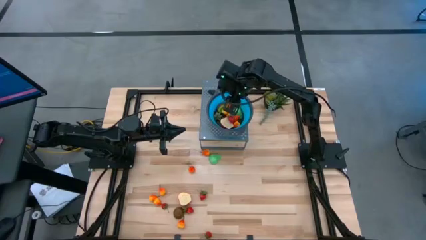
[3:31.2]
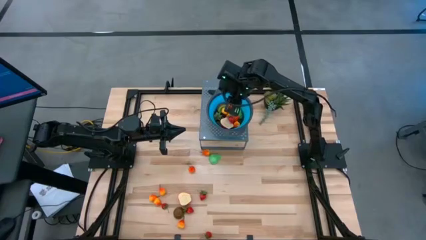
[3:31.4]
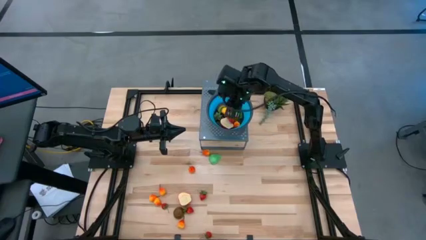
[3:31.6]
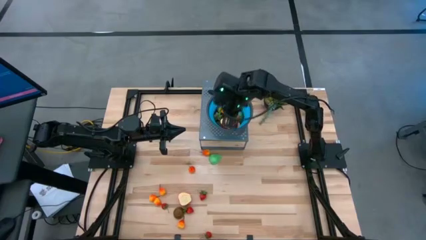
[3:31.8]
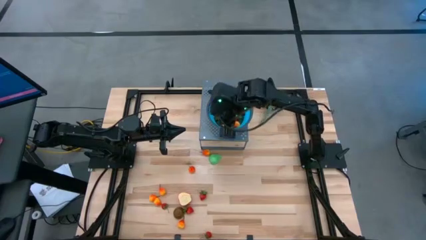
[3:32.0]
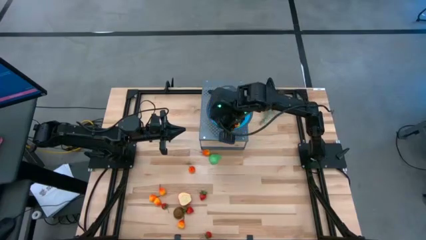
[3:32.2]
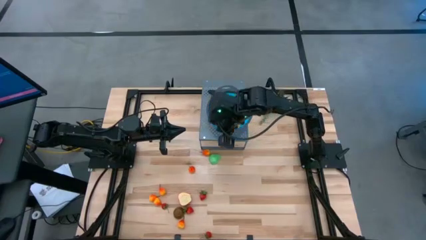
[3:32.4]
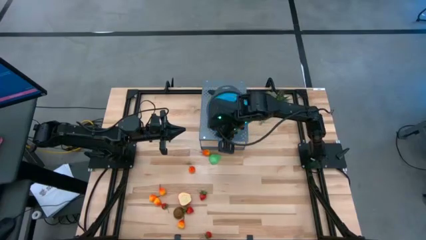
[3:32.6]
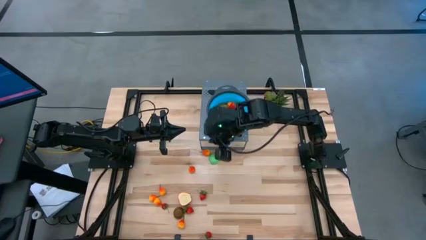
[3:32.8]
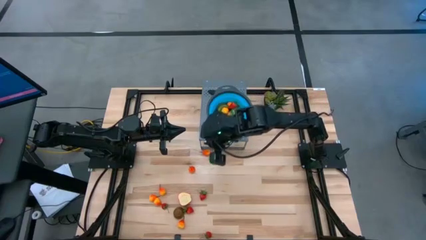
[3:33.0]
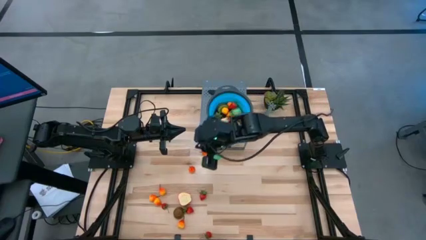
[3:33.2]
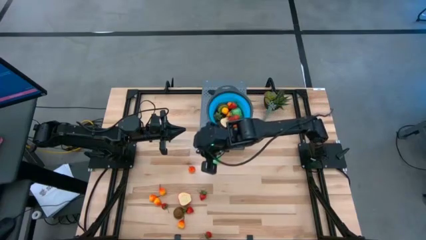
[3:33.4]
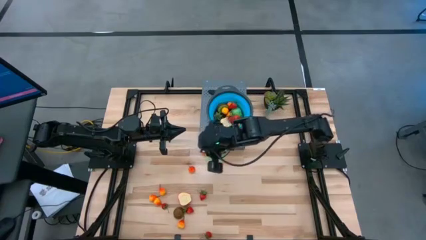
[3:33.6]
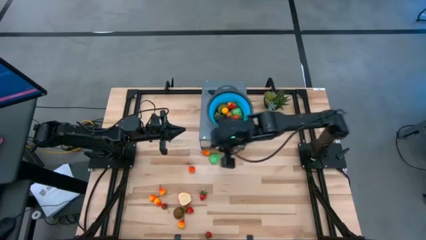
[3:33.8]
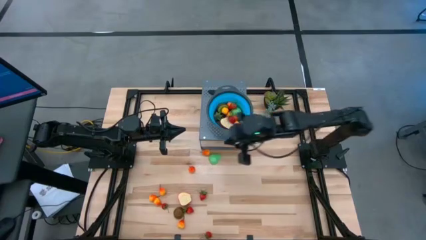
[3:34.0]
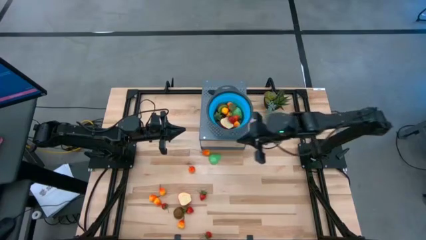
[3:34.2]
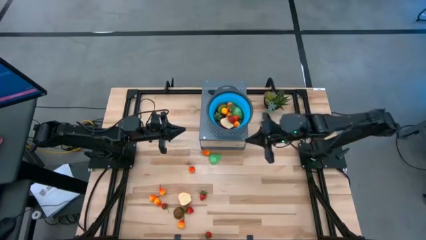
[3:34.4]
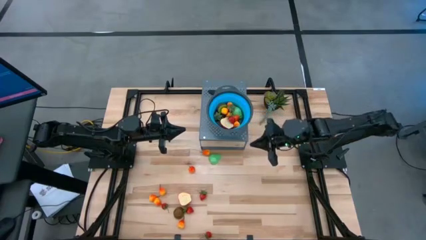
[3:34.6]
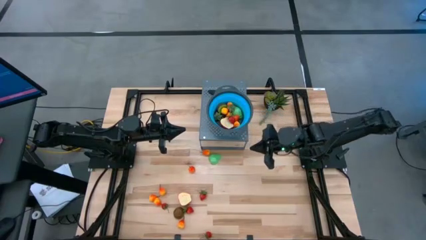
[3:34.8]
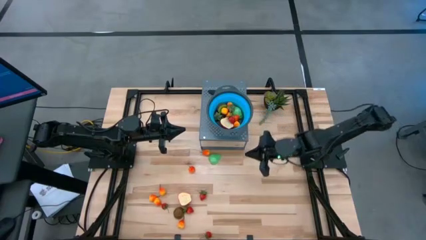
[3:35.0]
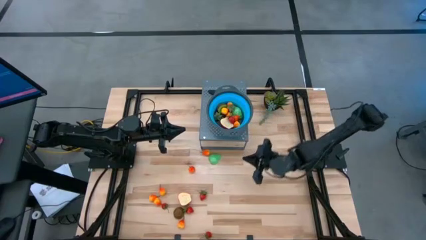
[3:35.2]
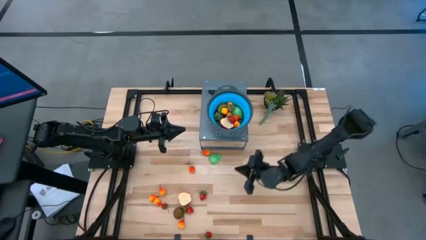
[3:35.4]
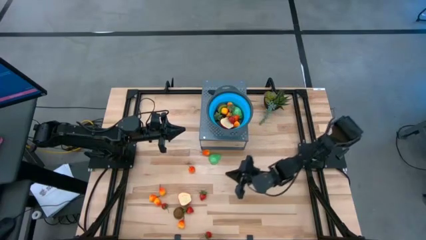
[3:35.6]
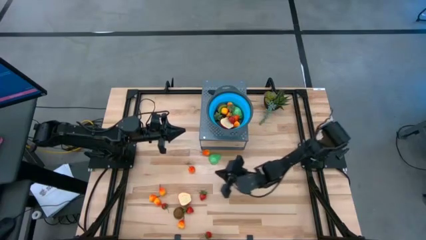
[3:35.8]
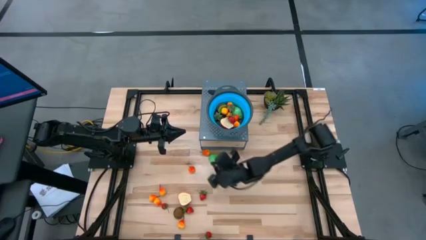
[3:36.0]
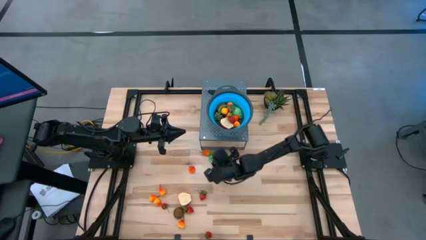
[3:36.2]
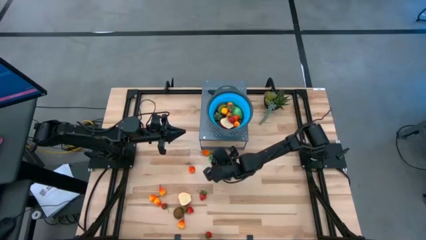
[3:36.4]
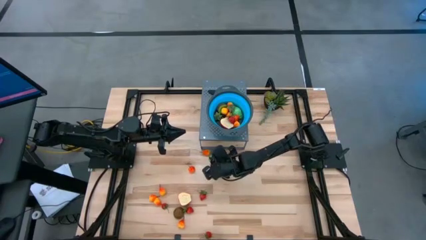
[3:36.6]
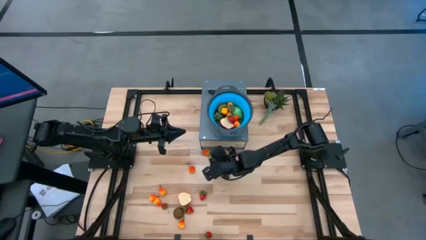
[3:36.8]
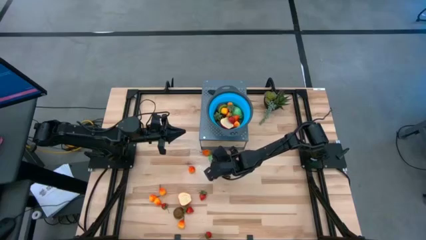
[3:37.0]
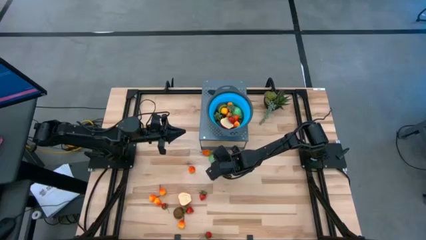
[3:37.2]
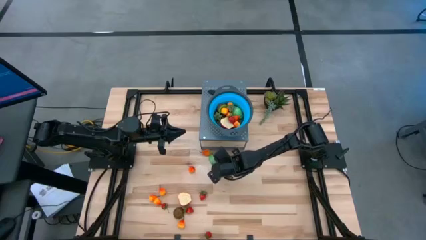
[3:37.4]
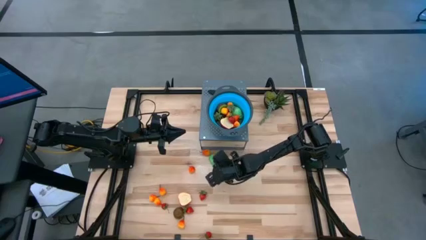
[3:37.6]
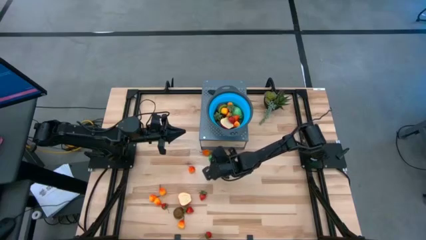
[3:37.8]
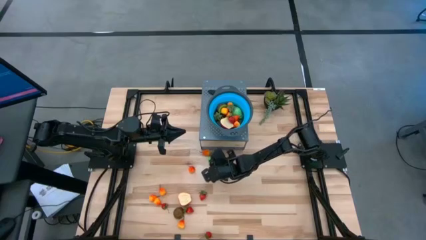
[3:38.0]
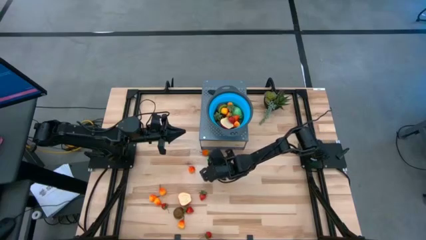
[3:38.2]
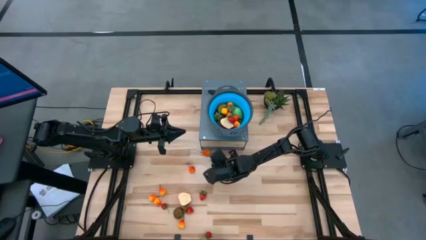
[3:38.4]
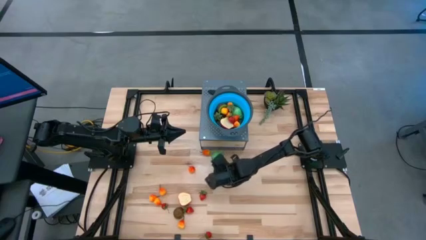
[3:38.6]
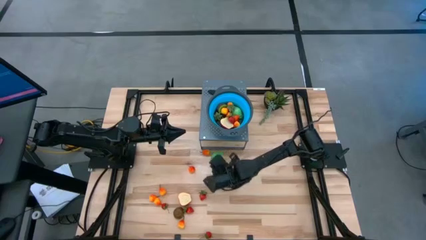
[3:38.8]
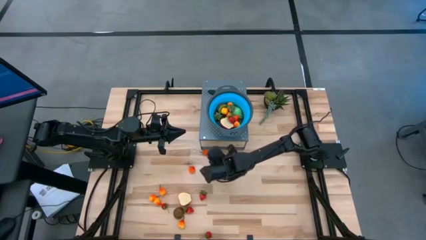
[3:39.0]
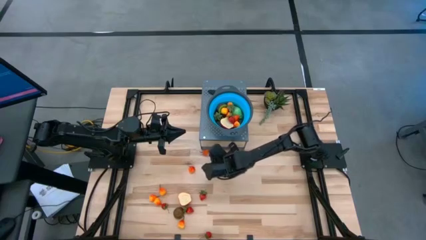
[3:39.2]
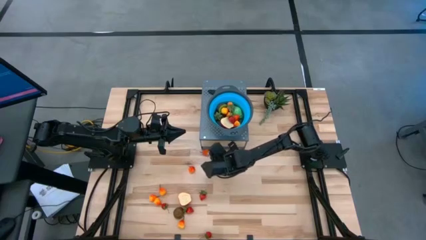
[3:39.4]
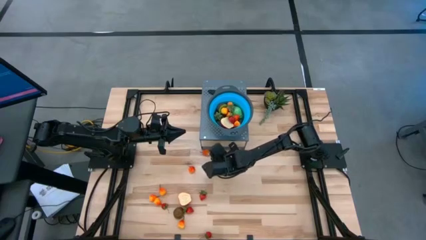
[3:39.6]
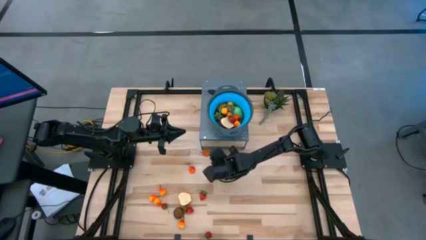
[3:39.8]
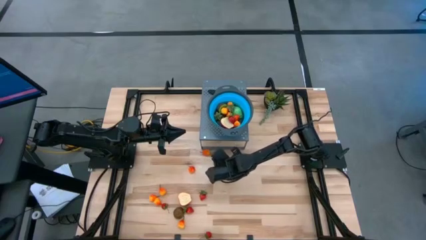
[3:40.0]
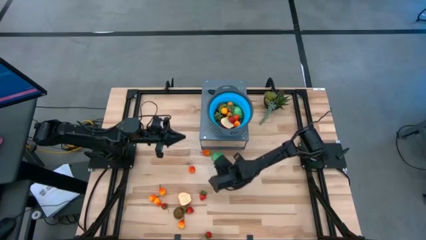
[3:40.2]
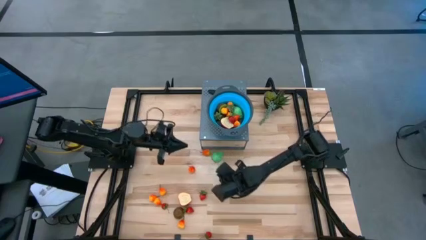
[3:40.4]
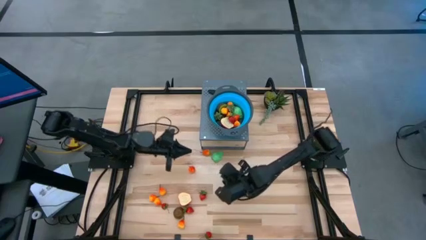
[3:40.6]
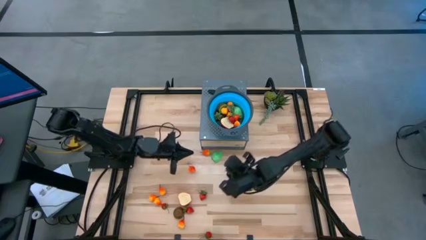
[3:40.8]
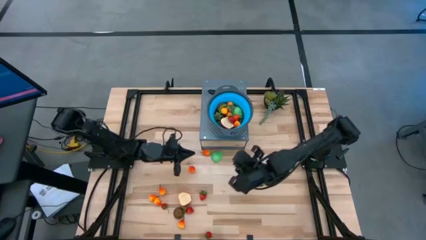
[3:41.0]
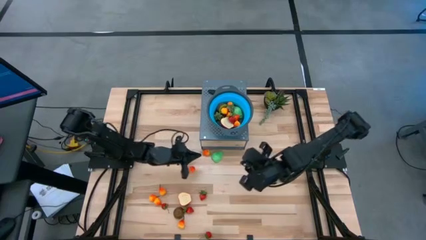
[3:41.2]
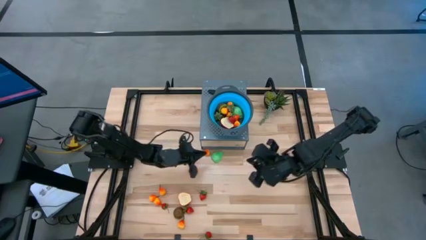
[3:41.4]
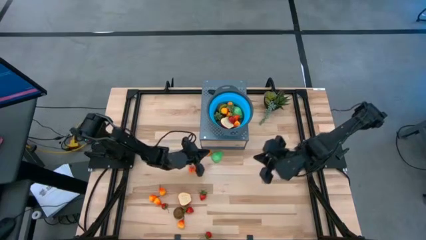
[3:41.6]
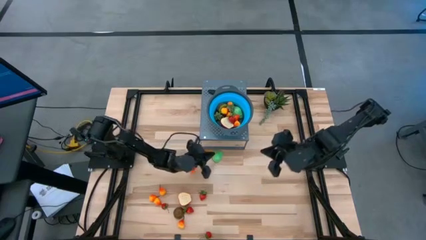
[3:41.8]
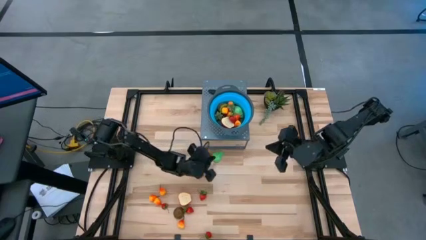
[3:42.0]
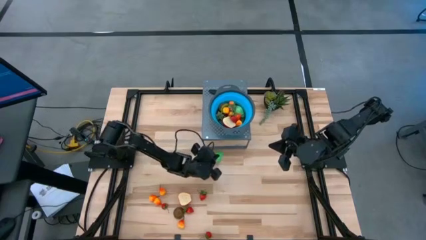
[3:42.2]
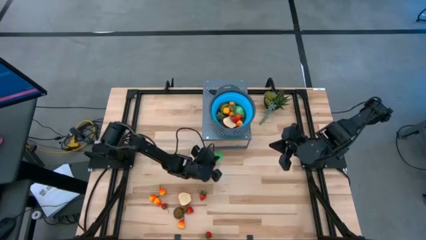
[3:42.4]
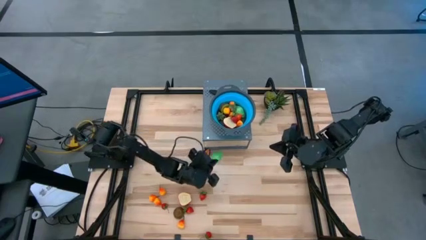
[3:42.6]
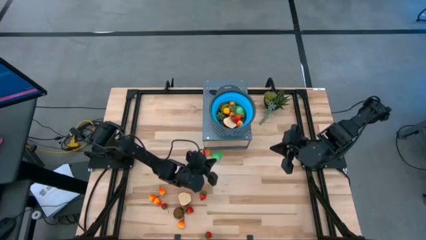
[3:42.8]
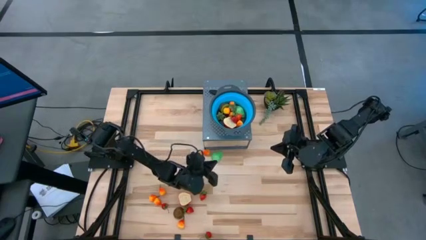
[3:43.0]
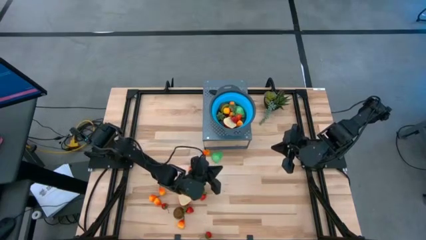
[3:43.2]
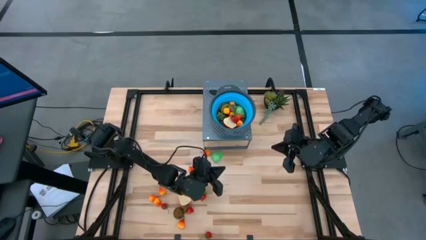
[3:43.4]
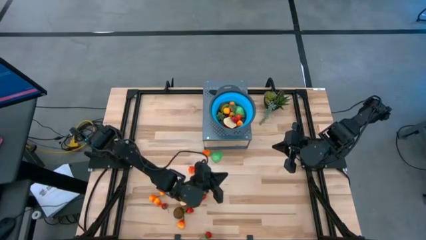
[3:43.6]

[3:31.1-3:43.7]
Task: Pick & Place Fruit
Put the sliced pear into the strainer bowl

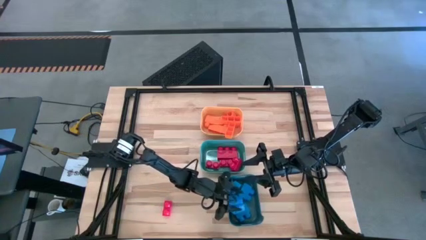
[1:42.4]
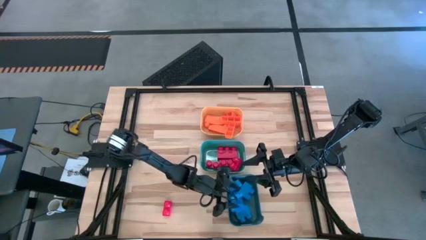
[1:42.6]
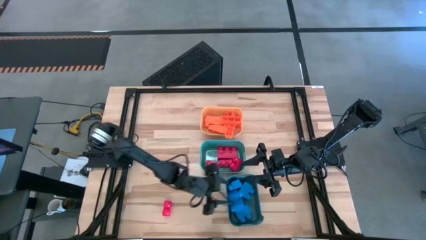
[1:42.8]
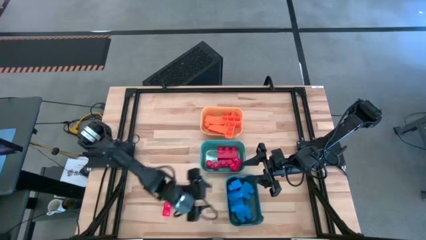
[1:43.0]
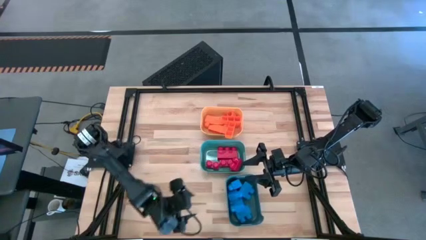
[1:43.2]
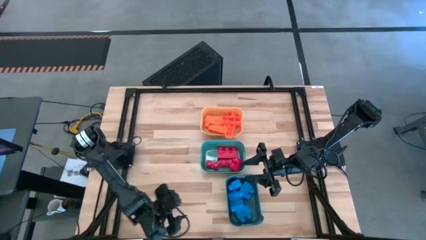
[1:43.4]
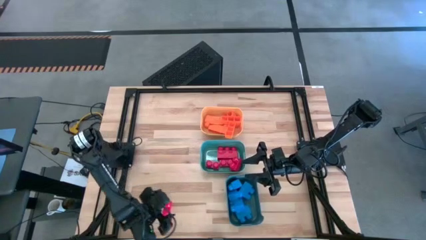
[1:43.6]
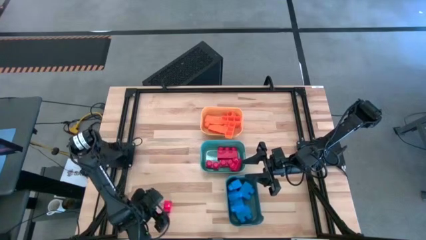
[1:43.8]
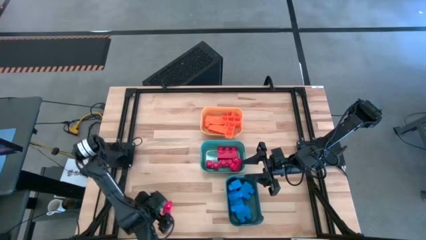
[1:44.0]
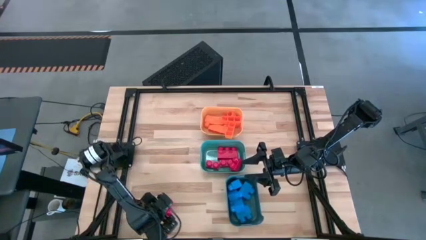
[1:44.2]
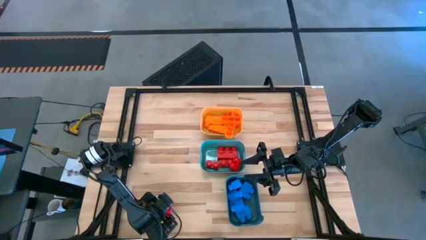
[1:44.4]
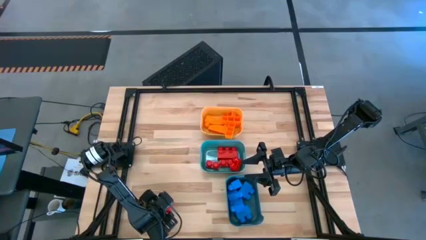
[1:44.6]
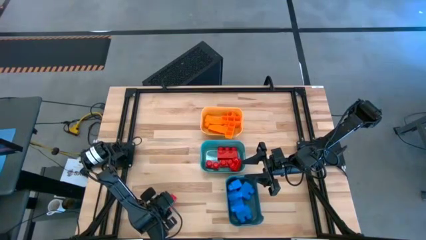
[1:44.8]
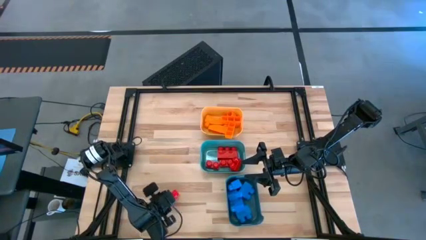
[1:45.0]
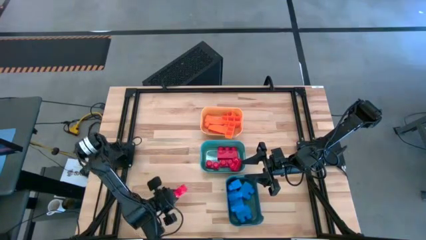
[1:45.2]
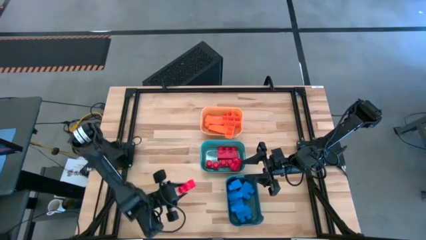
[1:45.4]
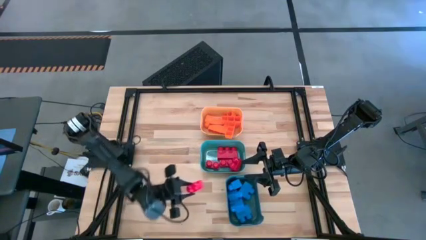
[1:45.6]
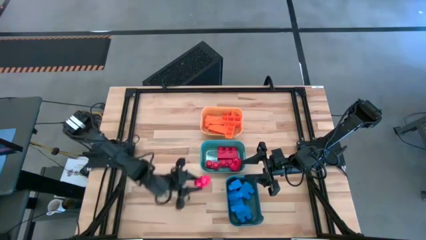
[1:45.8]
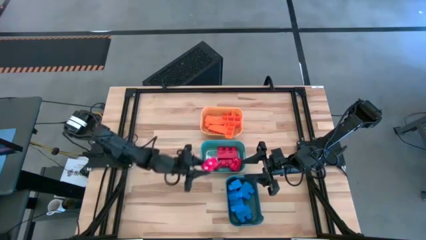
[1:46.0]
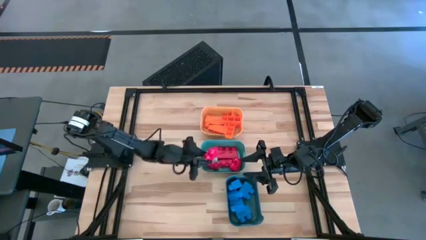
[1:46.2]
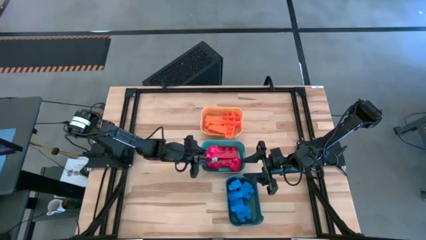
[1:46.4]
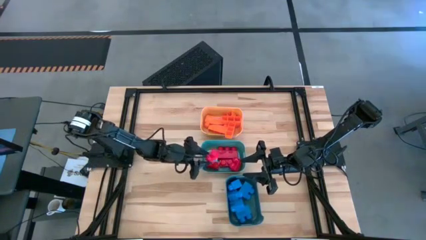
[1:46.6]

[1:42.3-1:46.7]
Task: Sort & place blocks by color
Put the red game piece into the green bin
